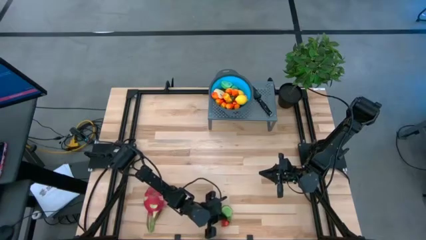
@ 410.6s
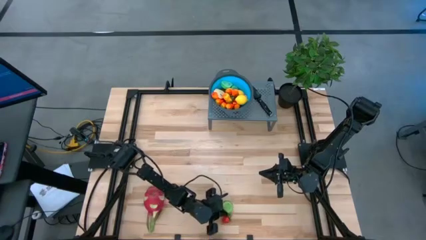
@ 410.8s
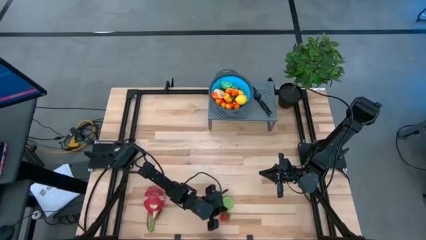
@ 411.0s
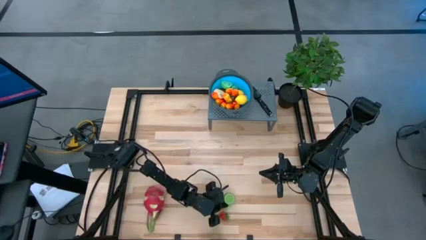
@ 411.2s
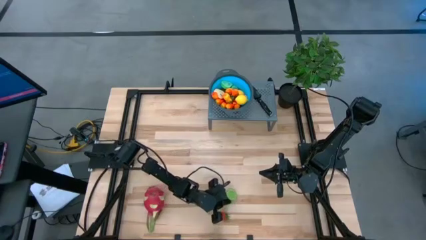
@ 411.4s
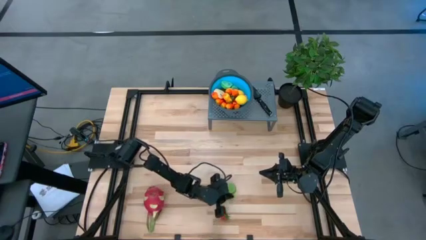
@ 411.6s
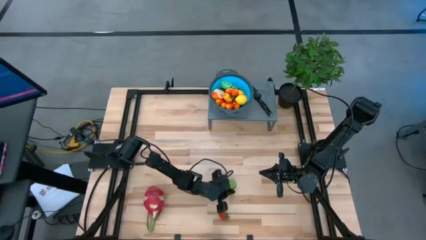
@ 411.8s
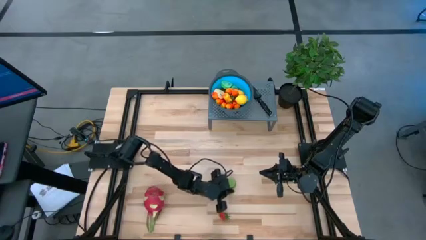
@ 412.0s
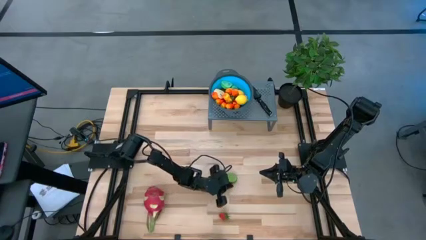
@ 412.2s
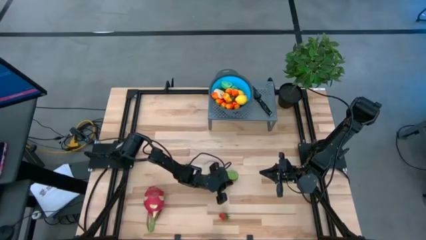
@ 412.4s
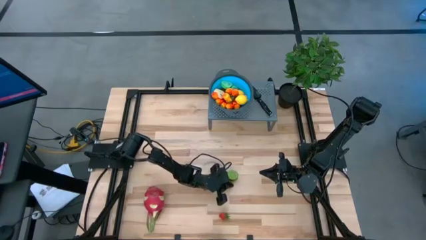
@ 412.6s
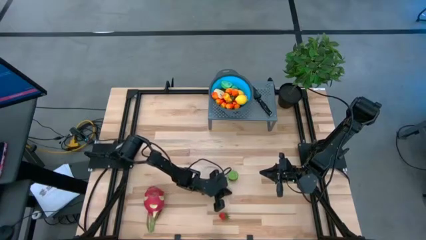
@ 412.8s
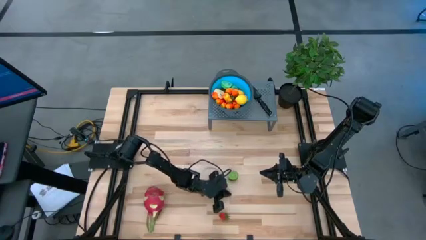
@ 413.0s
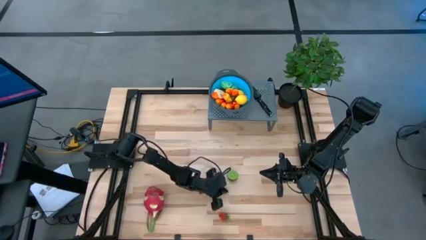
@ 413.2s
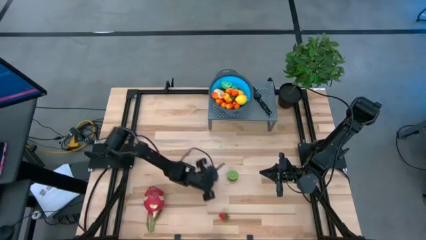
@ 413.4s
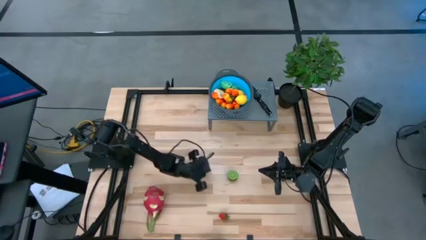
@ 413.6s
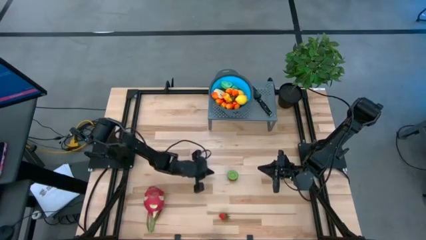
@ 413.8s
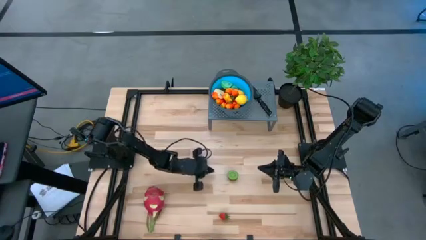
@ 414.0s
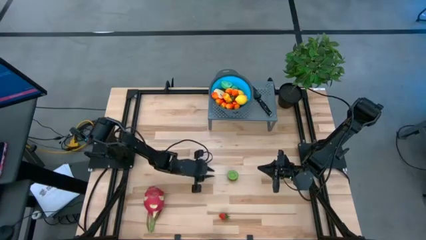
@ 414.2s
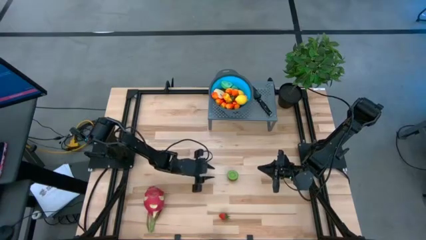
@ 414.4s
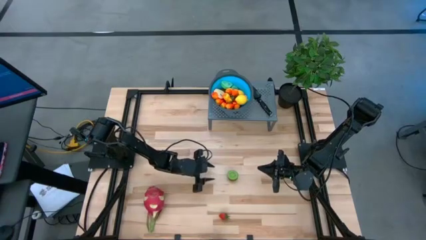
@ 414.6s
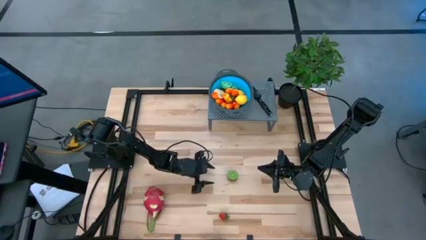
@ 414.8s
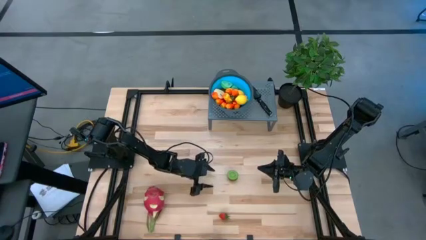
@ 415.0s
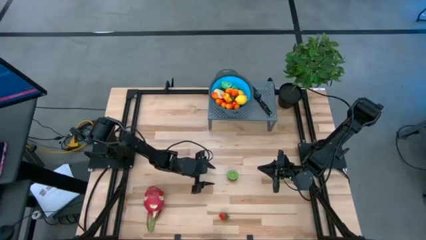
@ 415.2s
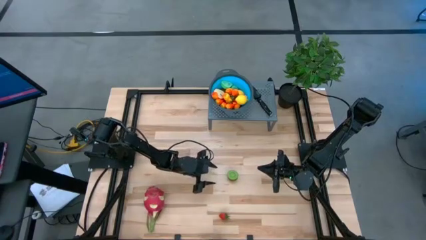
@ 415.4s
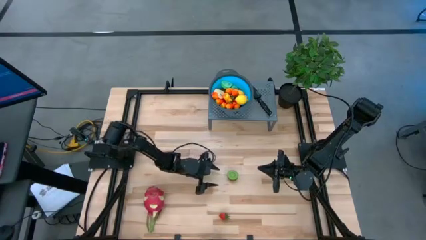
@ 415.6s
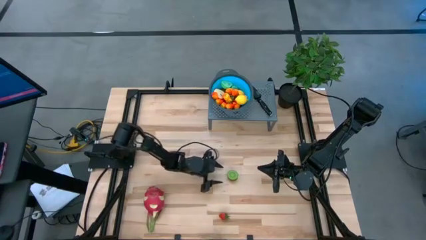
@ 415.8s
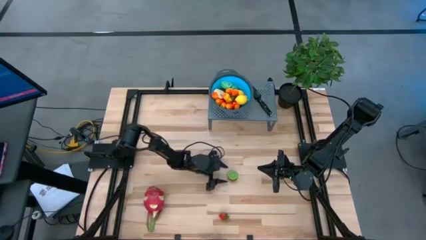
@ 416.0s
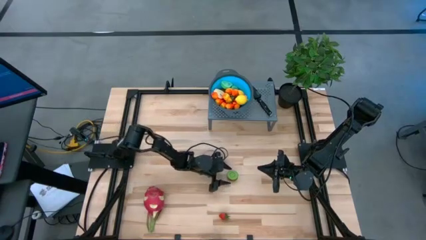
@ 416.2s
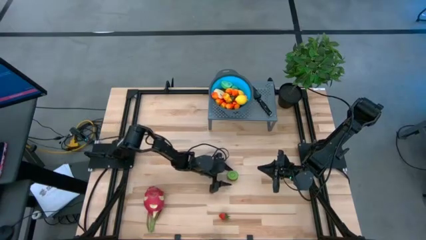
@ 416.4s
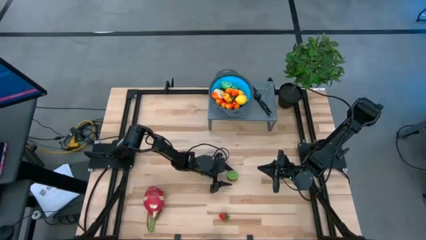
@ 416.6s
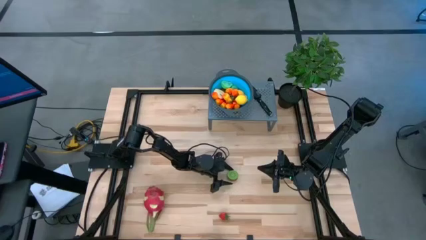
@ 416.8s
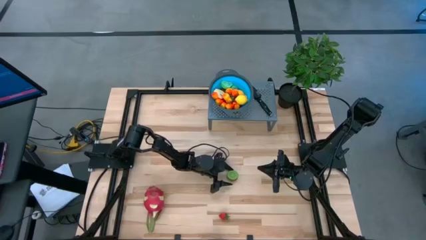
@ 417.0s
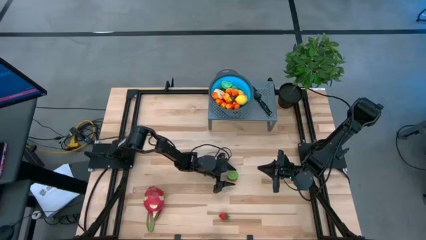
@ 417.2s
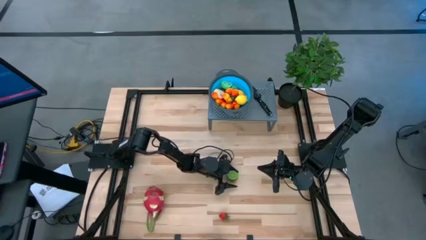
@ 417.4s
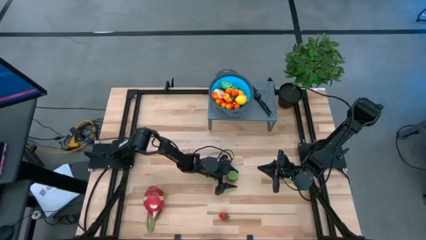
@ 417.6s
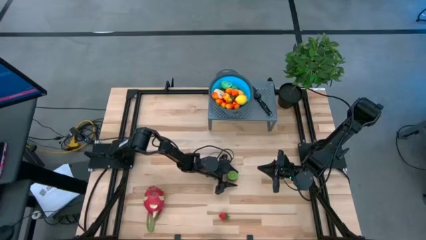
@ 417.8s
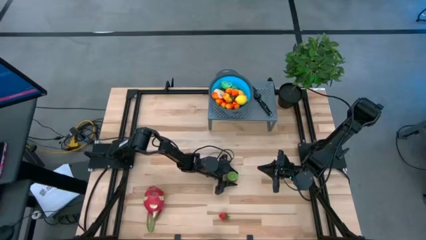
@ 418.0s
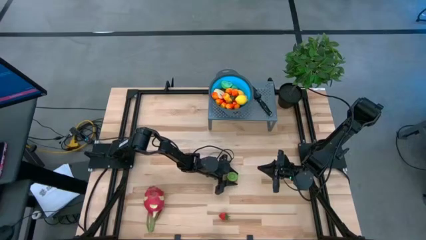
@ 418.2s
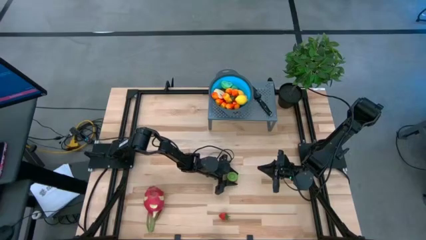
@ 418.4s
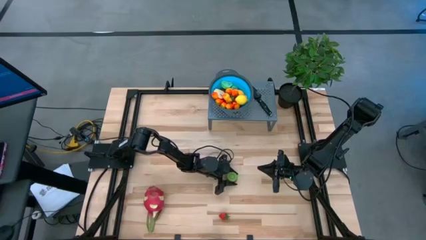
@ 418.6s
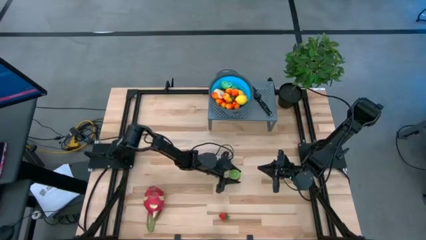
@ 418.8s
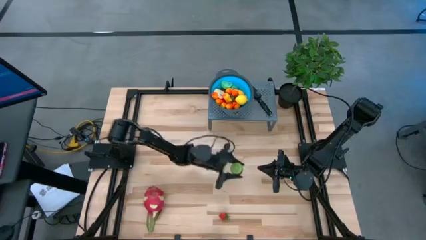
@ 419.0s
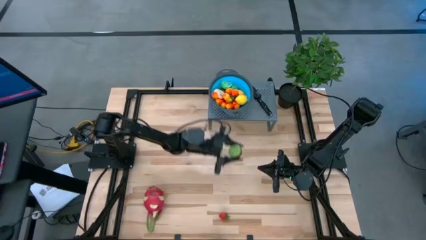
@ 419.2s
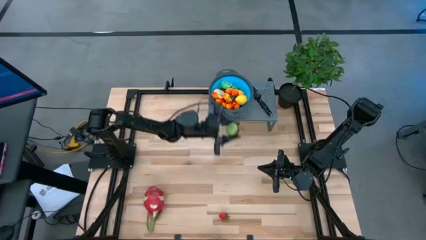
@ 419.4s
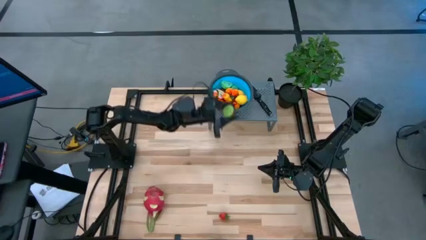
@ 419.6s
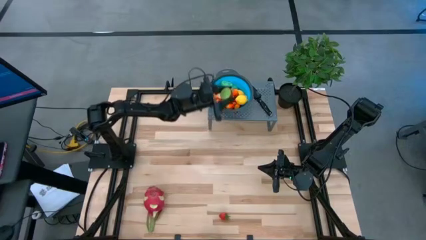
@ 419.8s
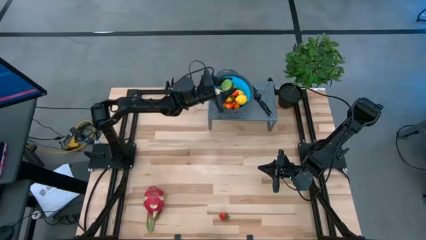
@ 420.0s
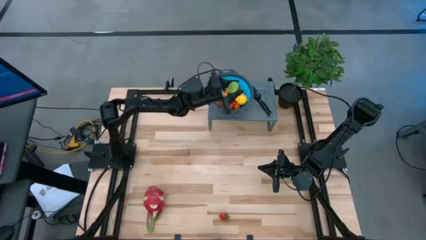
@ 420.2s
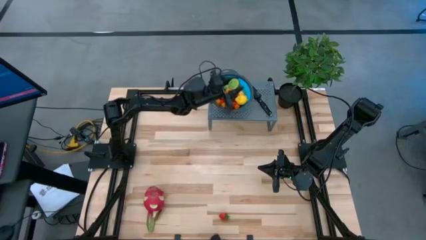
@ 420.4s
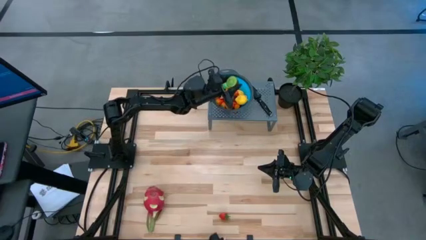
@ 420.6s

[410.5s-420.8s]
Task: Pick & Place Fruit
Put the kiwi into the strainer bowl

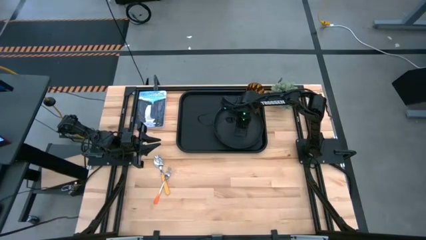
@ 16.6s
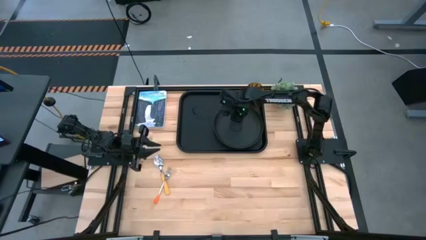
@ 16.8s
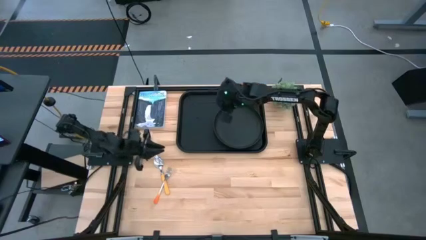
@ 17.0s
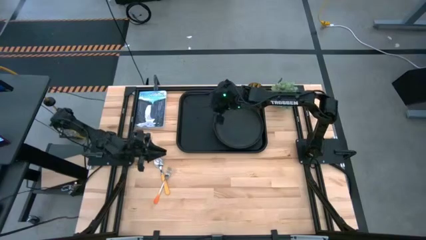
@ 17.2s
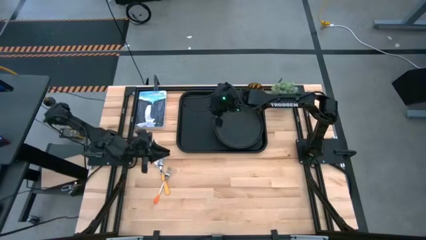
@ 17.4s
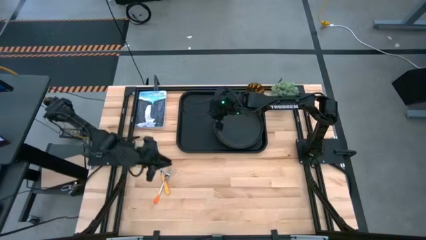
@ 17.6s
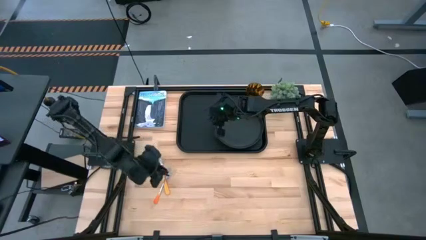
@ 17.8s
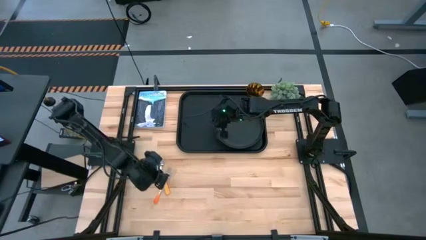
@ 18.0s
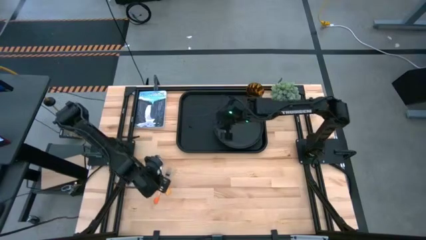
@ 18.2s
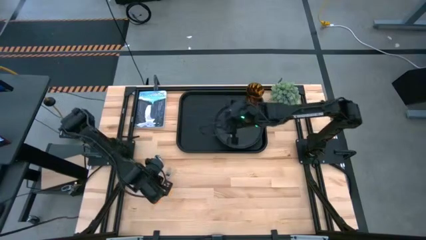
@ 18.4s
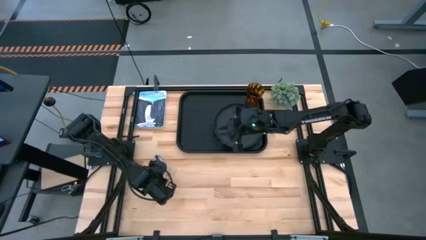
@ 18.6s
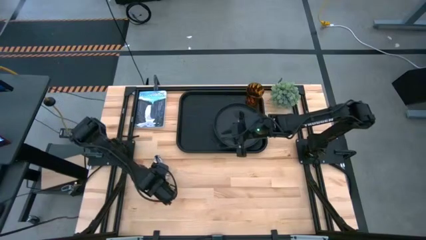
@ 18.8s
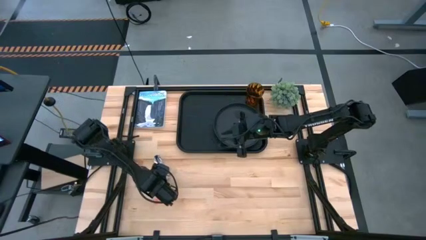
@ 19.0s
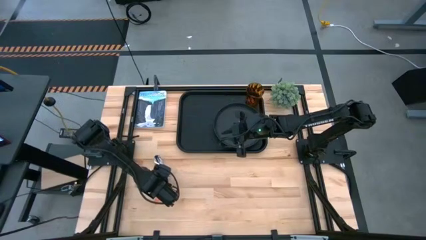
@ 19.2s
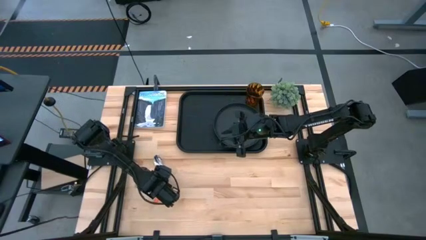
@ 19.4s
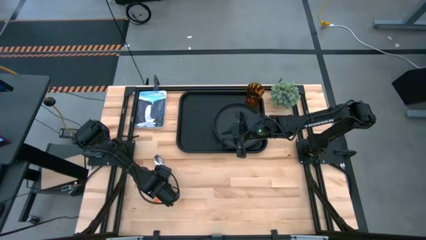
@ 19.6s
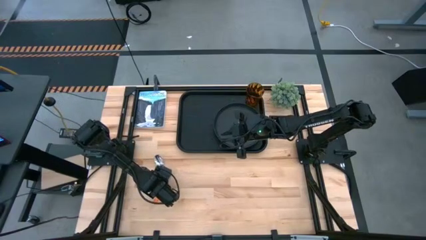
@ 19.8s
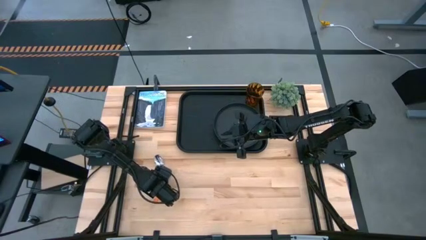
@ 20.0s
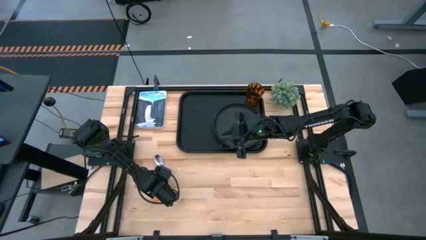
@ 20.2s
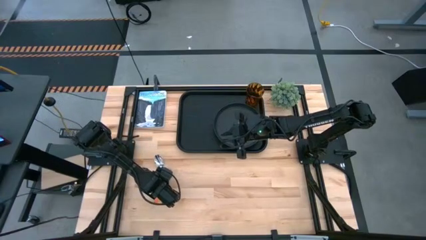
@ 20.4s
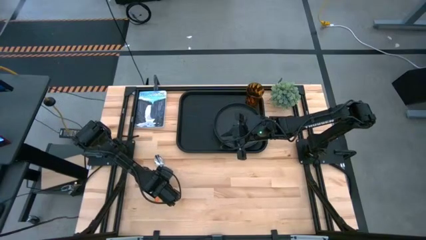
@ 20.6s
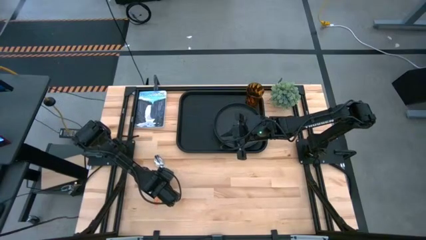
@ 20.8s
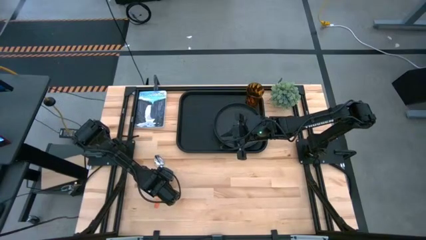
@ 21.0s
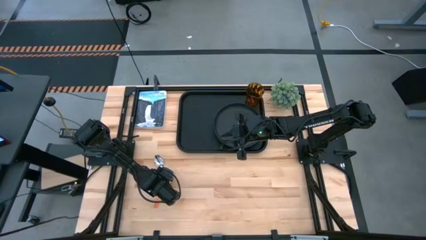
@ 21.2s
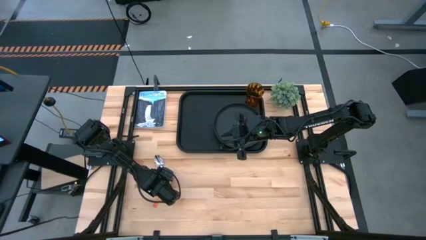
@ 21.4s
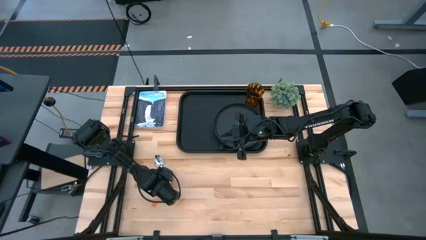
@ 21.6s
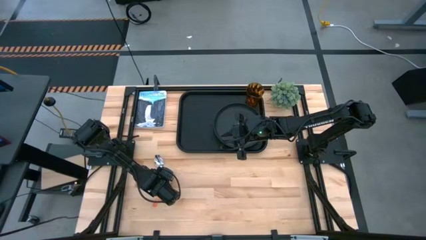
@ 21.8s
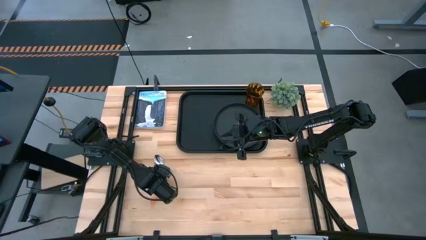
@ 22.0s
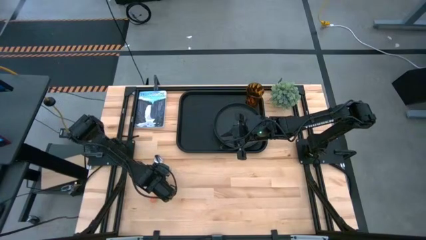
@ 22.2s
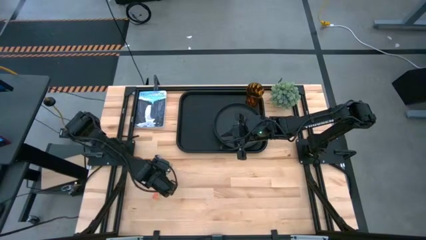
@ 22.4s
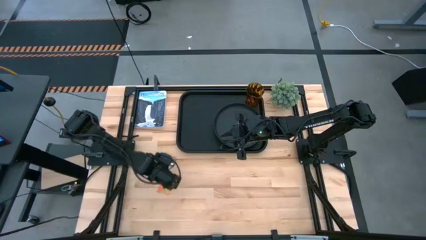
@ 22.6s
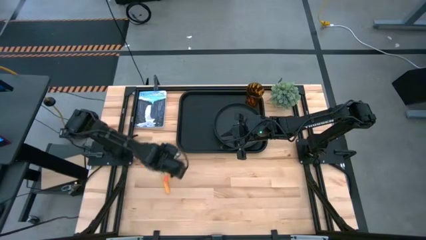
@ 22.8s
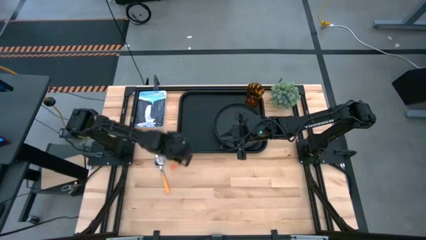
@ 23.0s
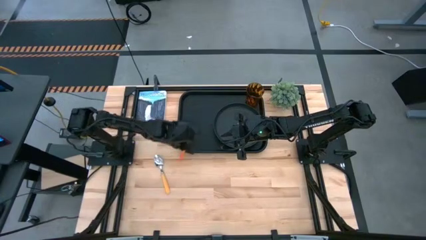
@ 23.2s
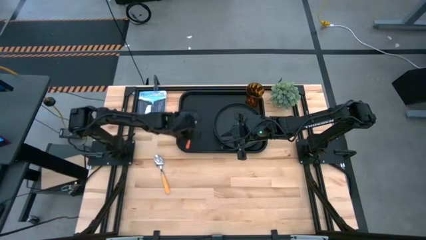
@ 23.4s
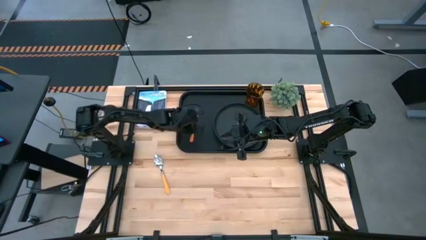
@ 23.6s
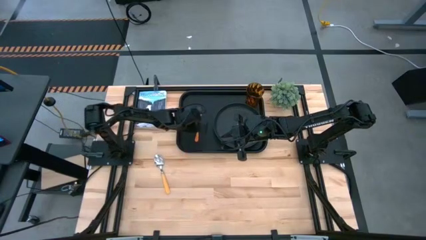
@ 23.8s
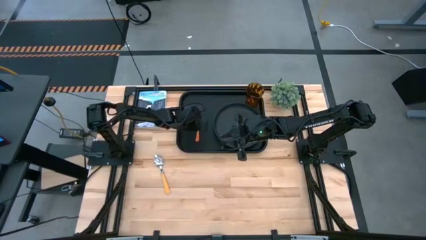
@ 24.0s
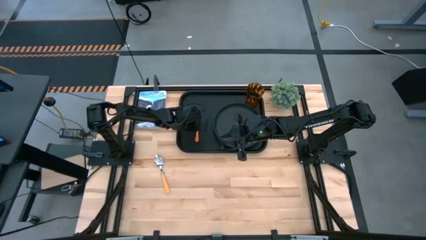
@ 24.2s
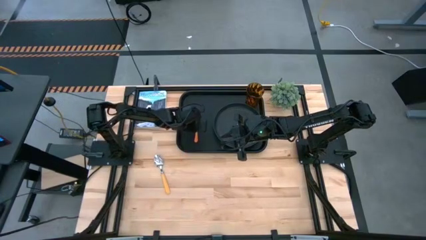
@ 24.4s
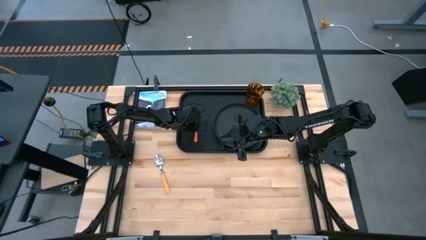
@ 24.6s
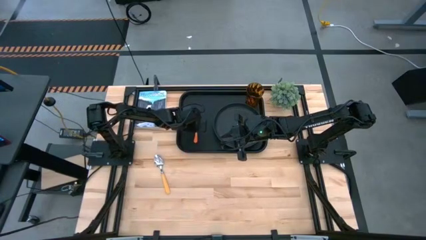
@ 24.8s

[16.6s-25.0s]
Task: Pick and place plate/cup/fork/spoon on tray
Put the orange fork on the black tray to the left of the black plate
